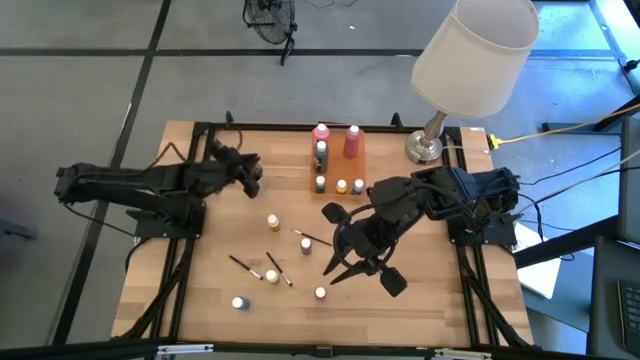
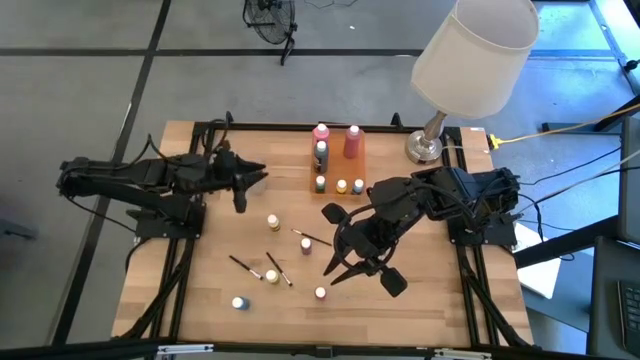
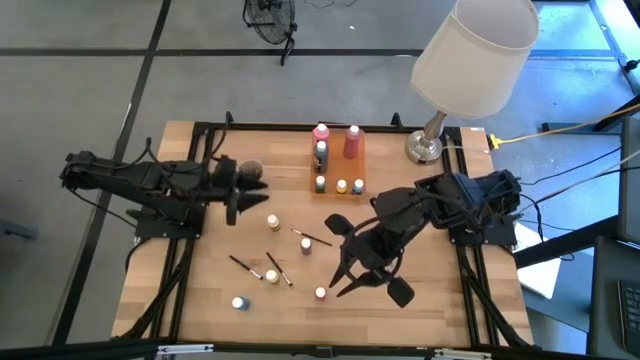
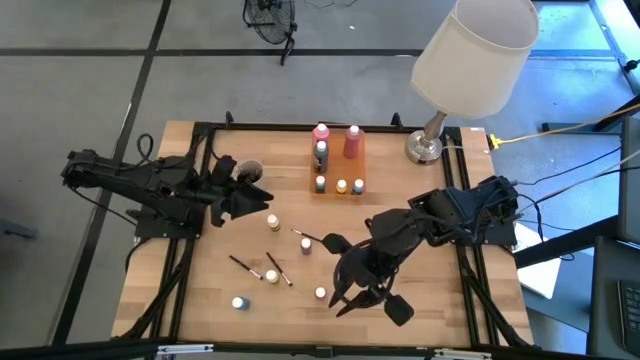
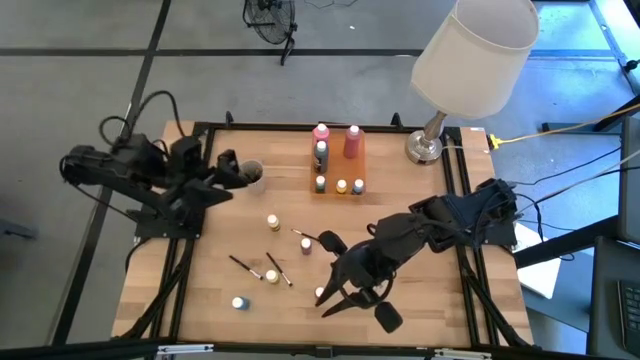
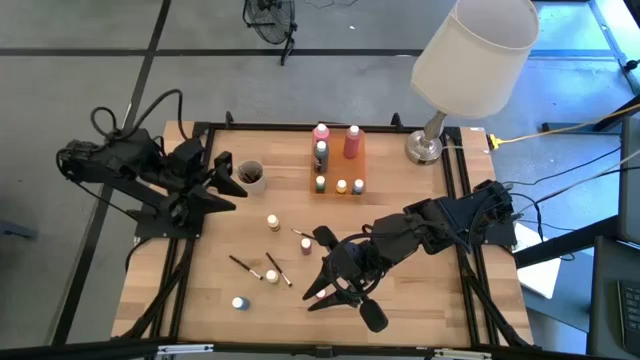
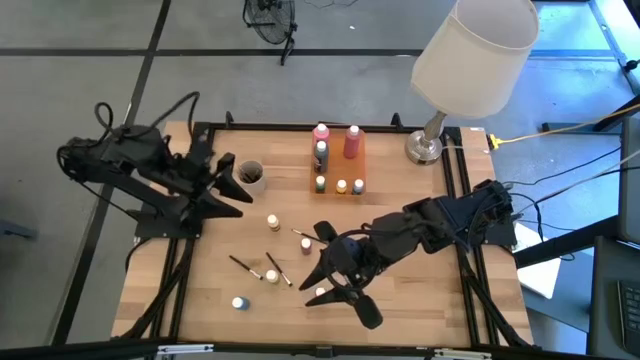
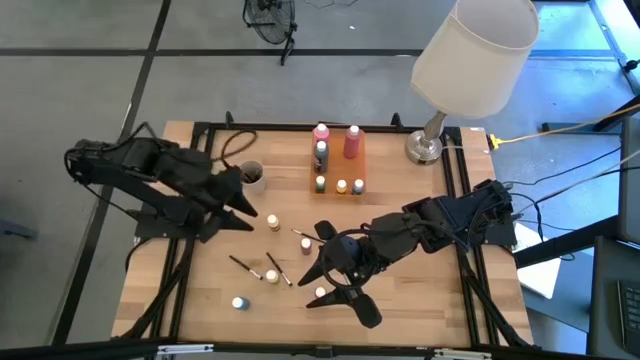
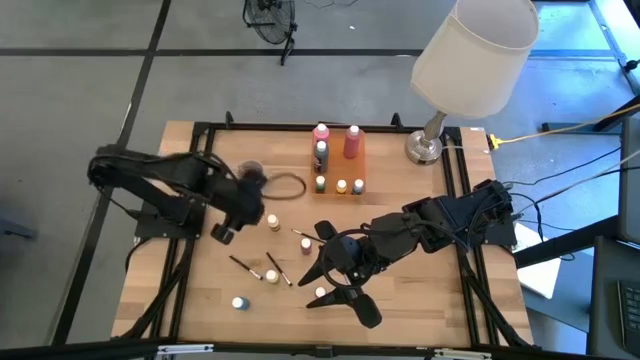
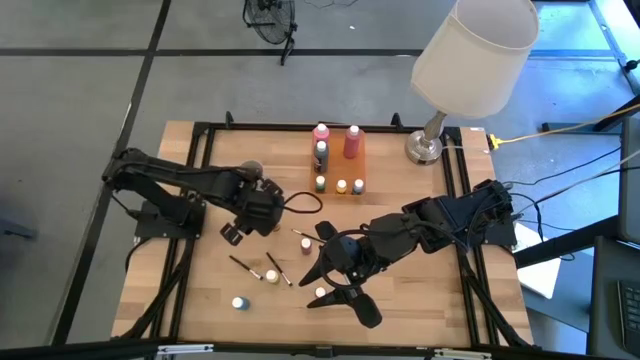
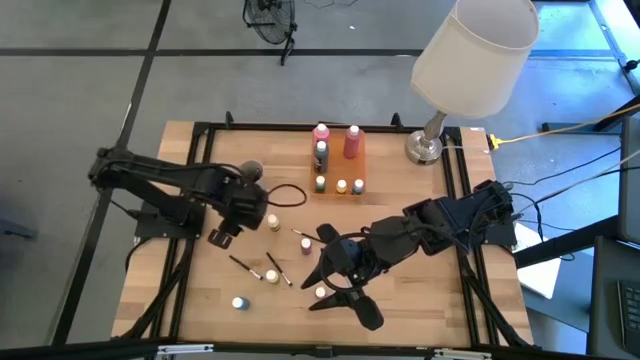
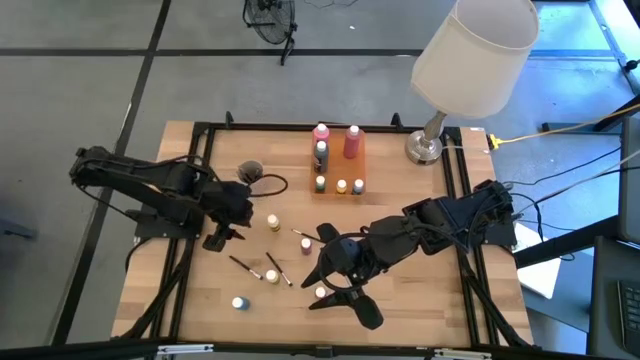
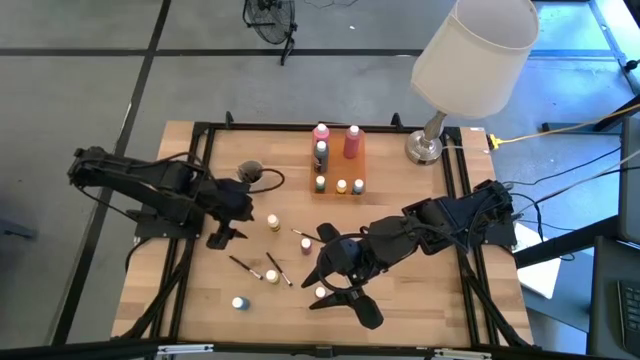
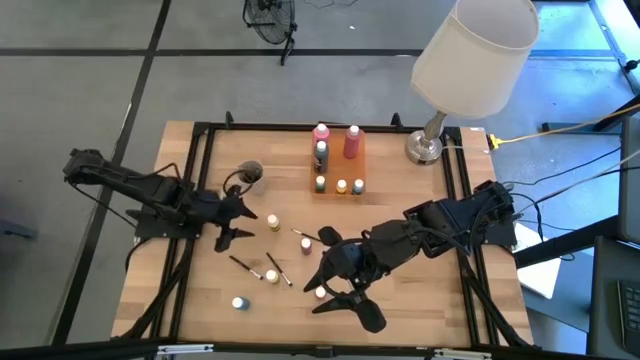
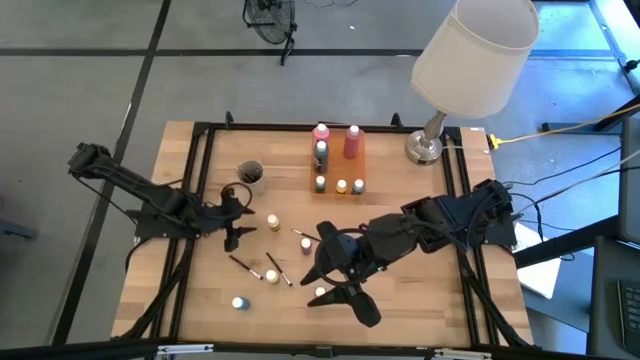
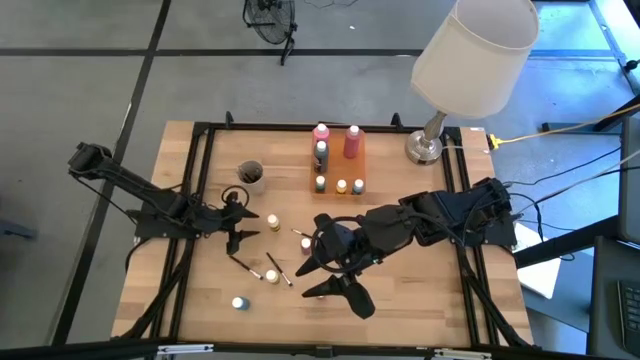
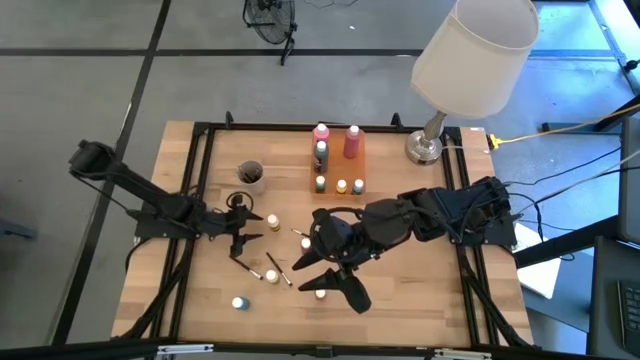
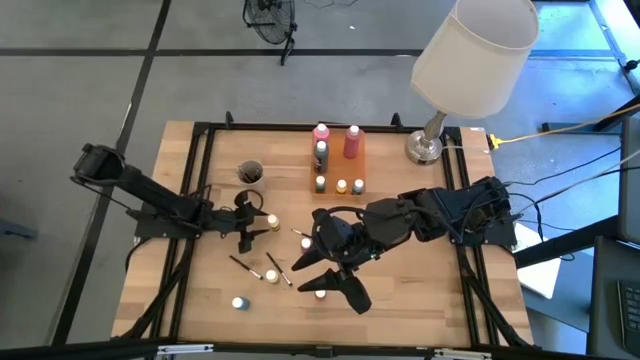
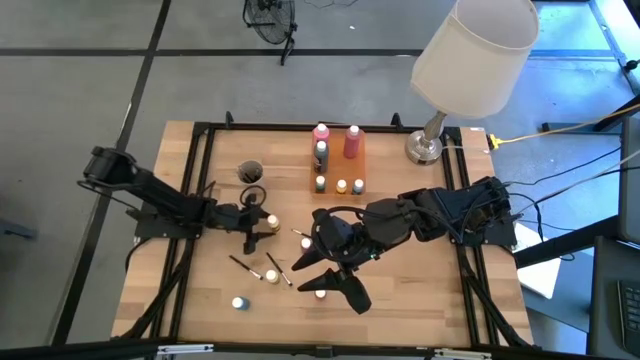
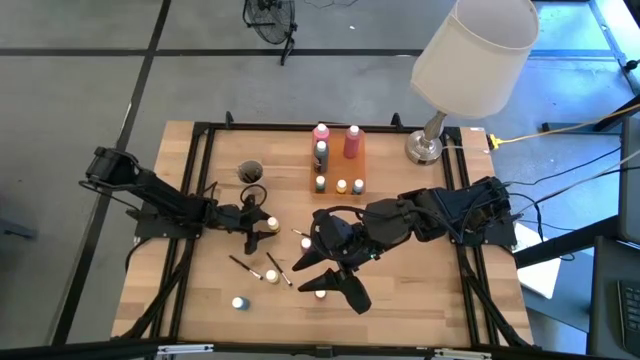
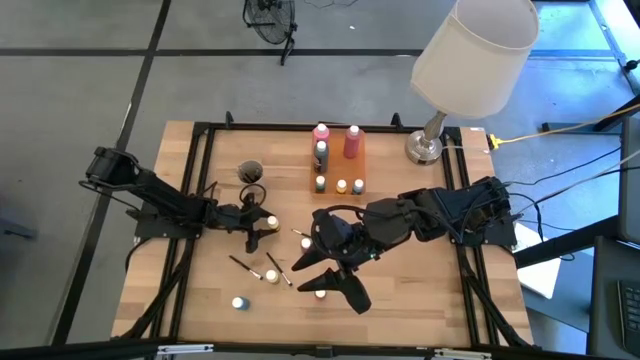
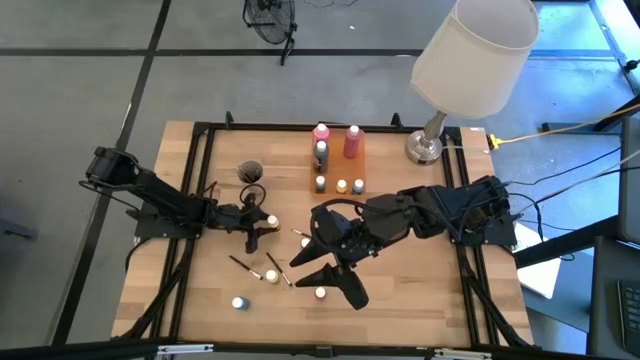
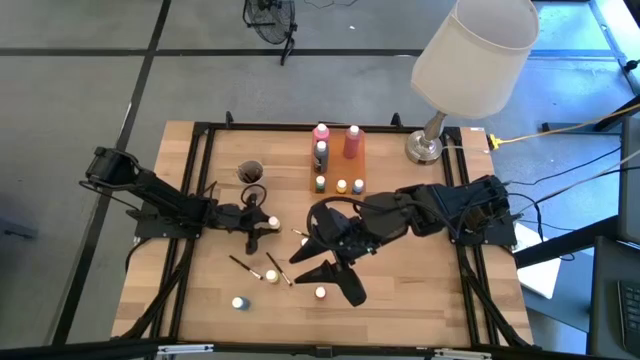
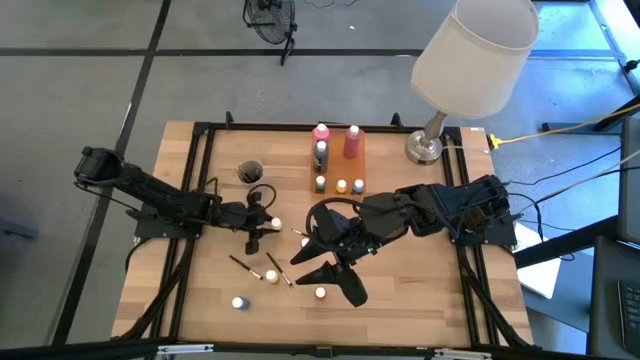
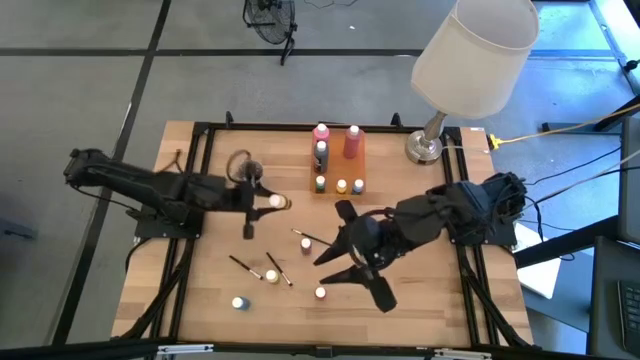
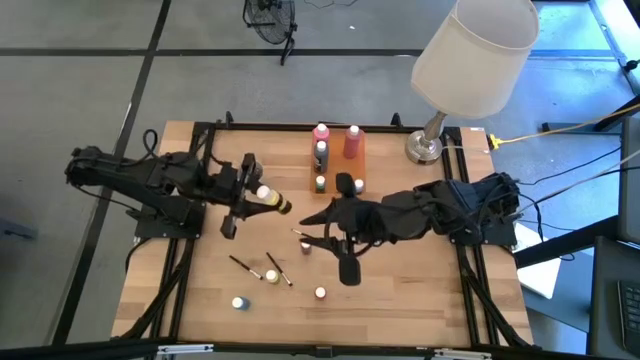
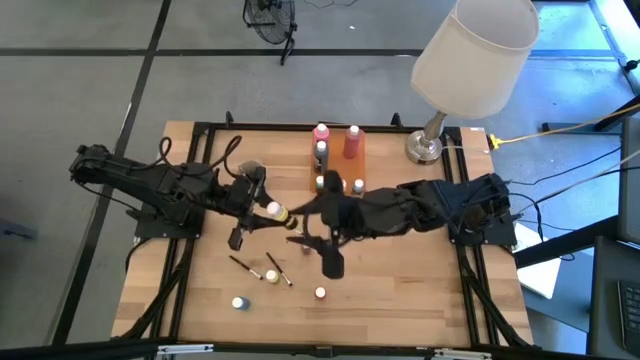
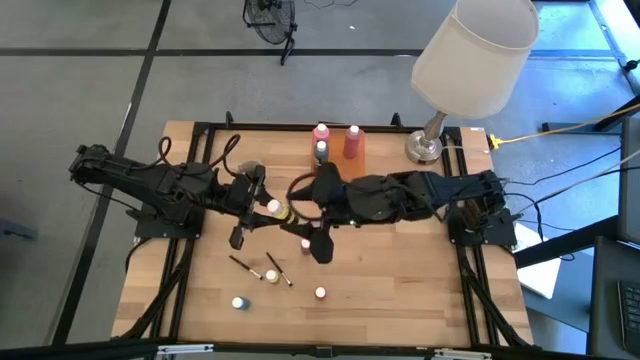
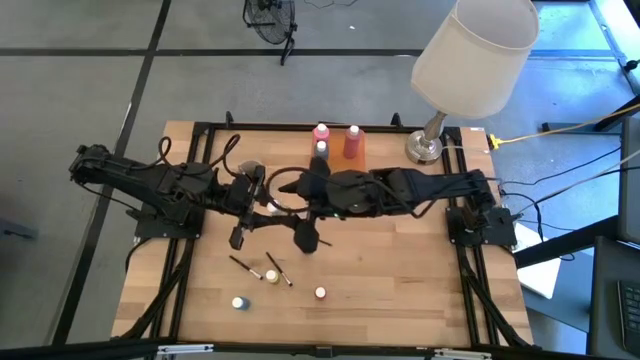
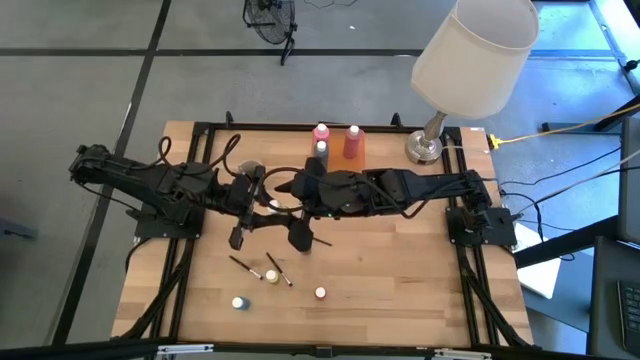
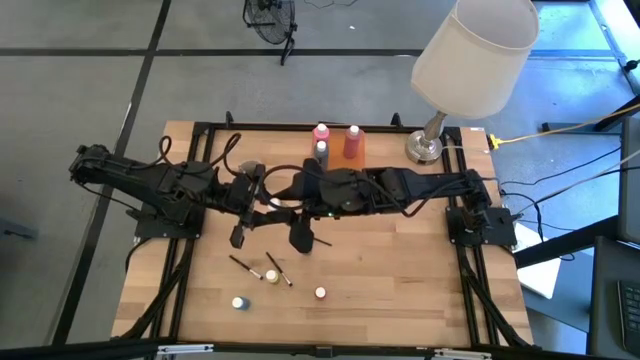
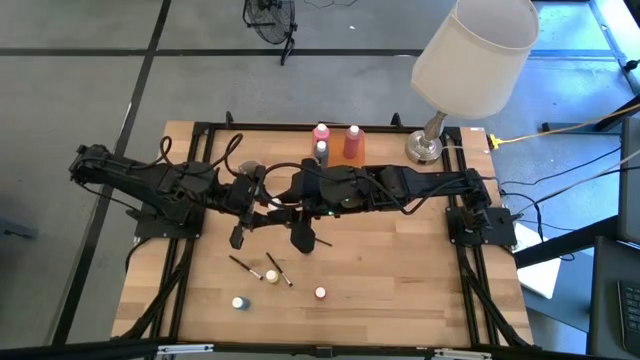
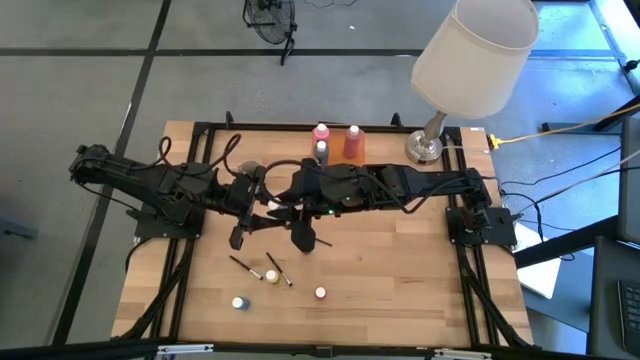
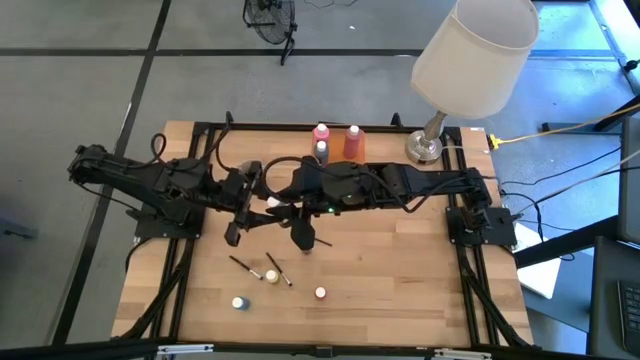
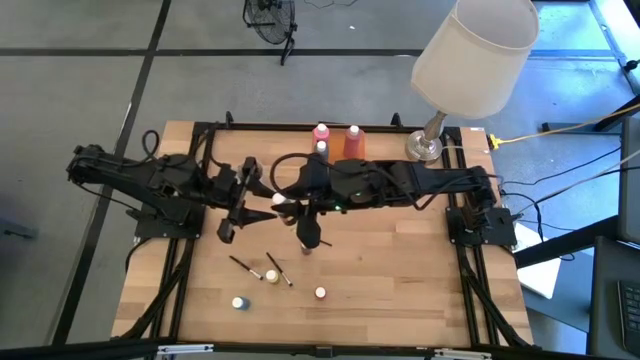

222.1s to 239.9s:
Task: Pick & Place Paint Supplies
Put the top small light yellow paint bottle into the orange bin

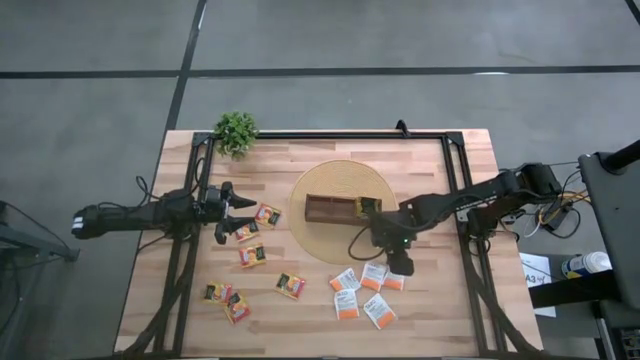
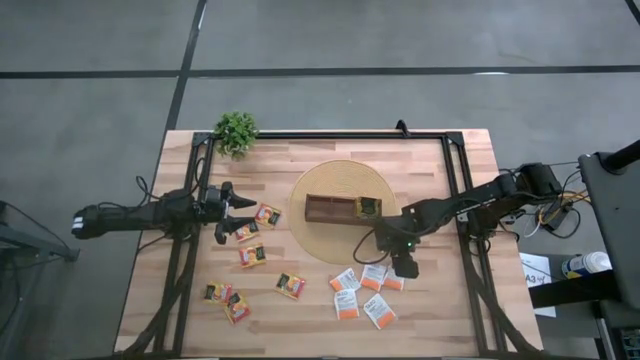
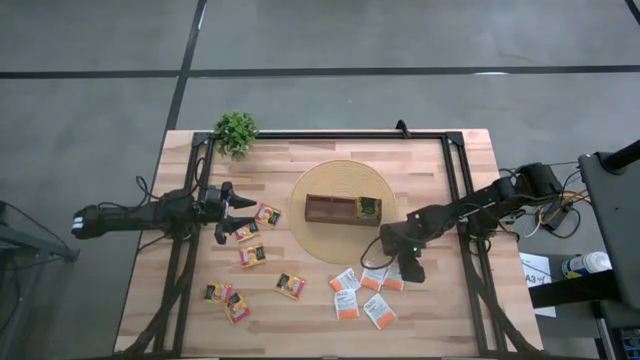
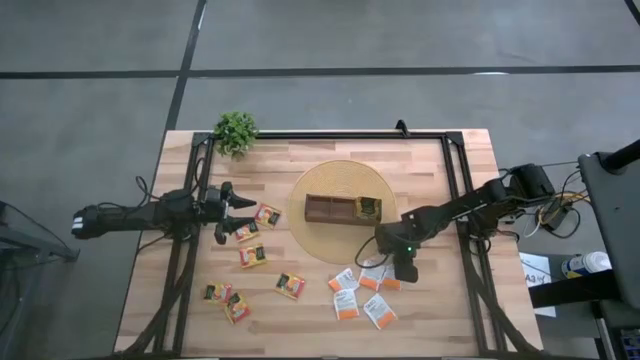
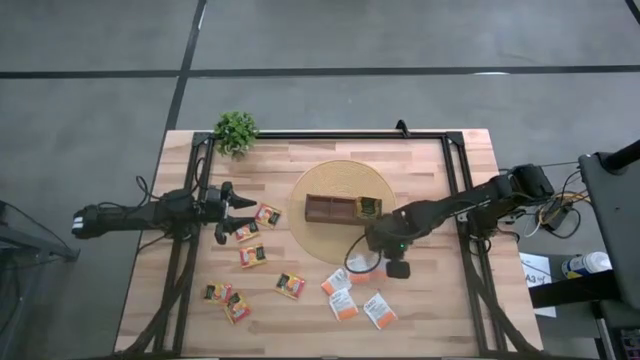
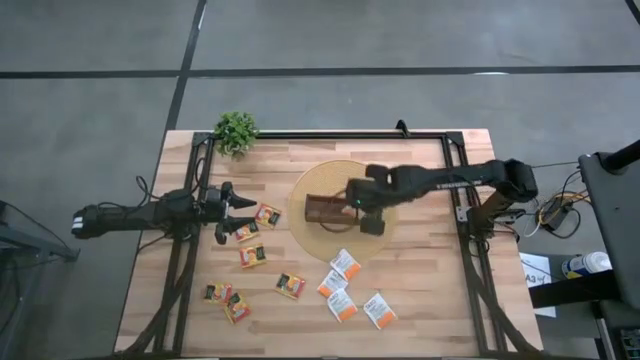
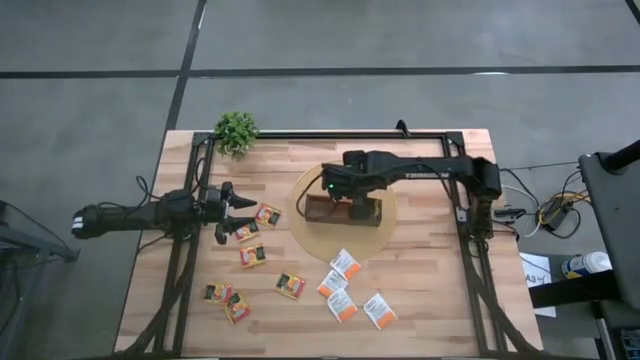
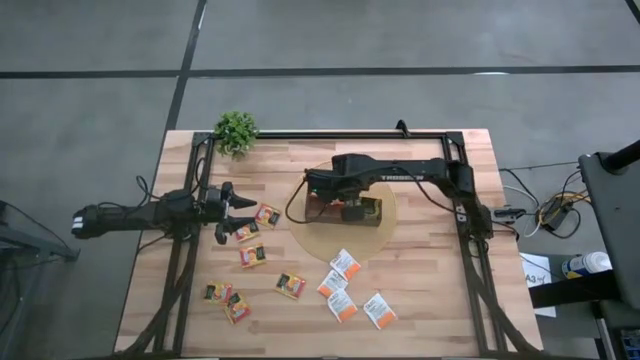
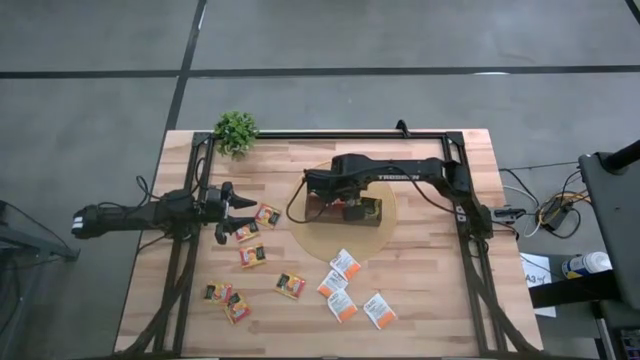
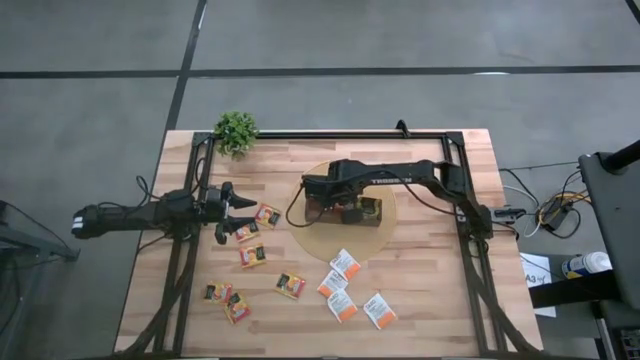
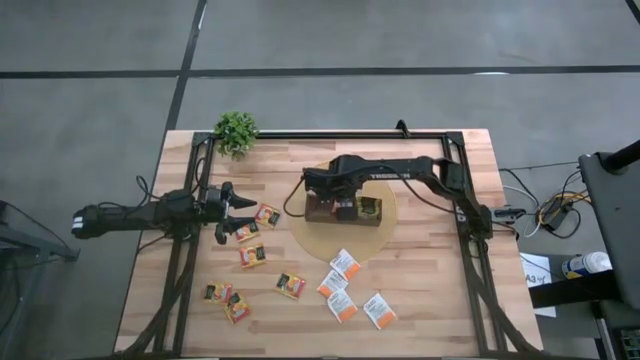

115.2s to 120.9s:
Task: Pick & Place Tea
Put the white tea bag into the middle section of the wooden organizer
